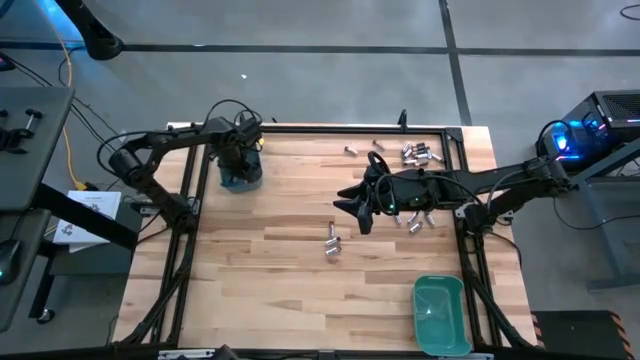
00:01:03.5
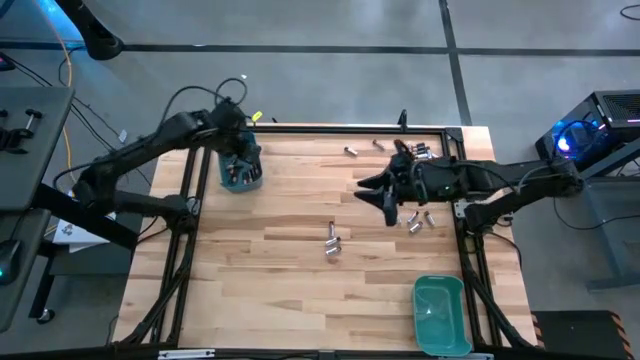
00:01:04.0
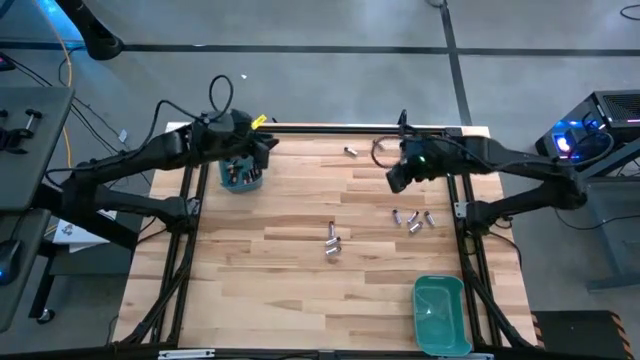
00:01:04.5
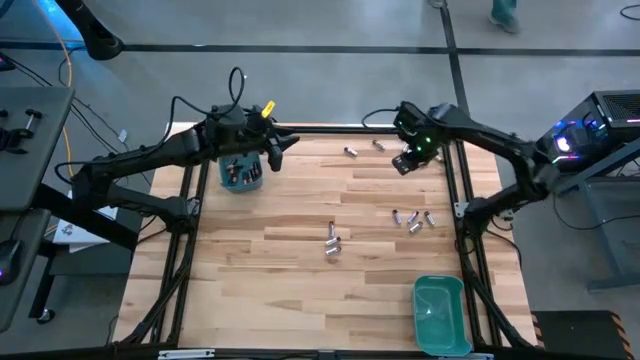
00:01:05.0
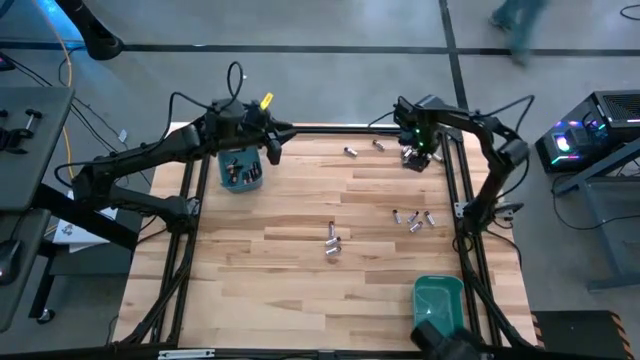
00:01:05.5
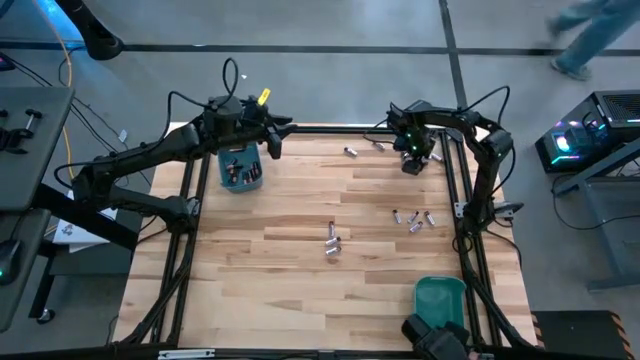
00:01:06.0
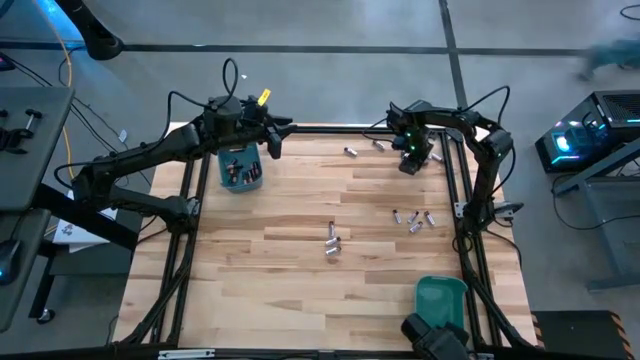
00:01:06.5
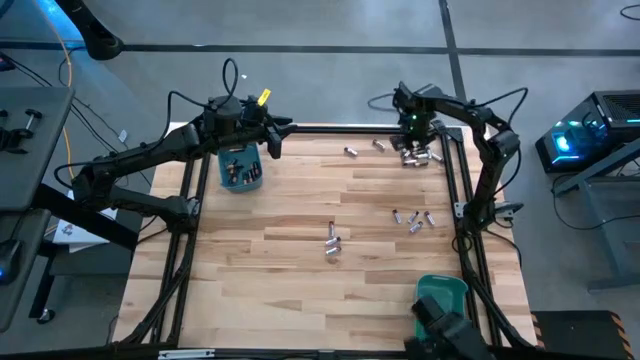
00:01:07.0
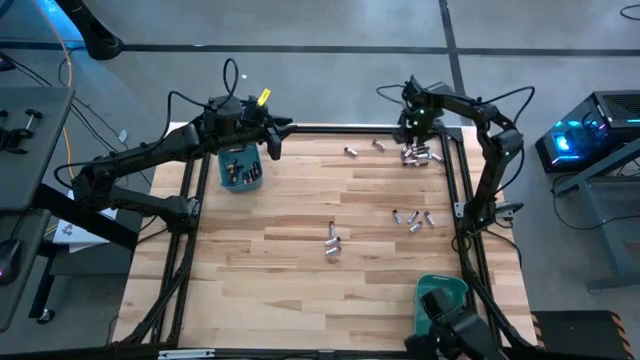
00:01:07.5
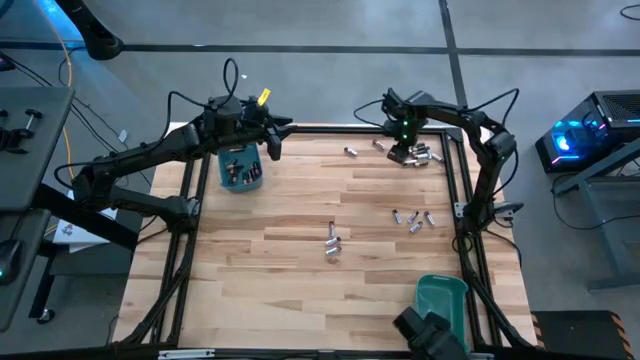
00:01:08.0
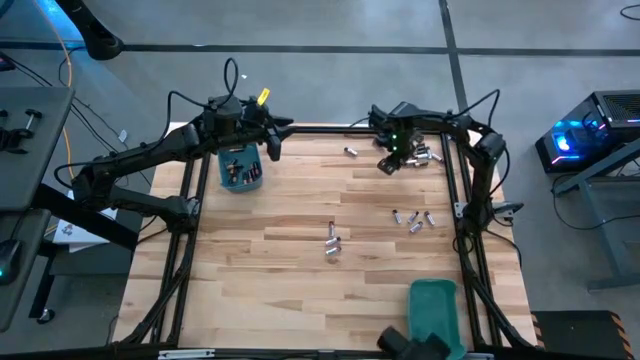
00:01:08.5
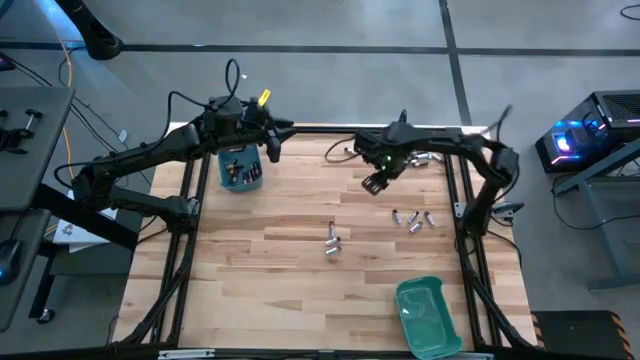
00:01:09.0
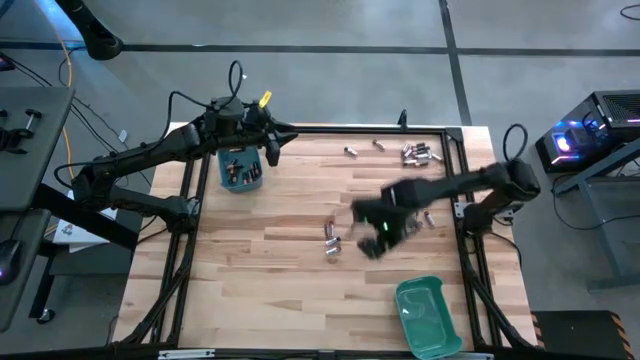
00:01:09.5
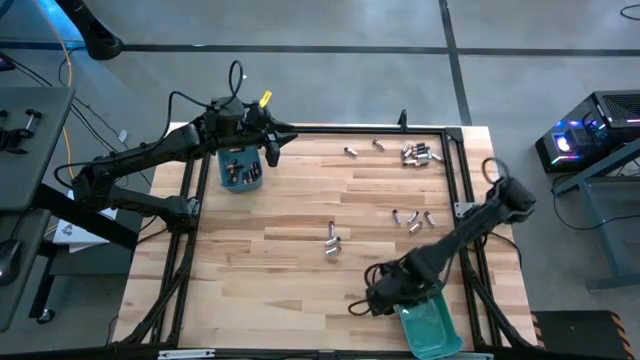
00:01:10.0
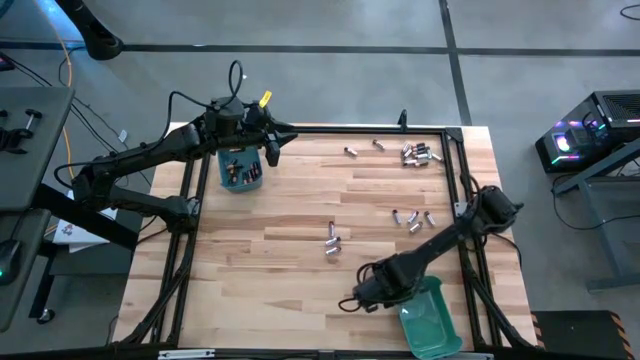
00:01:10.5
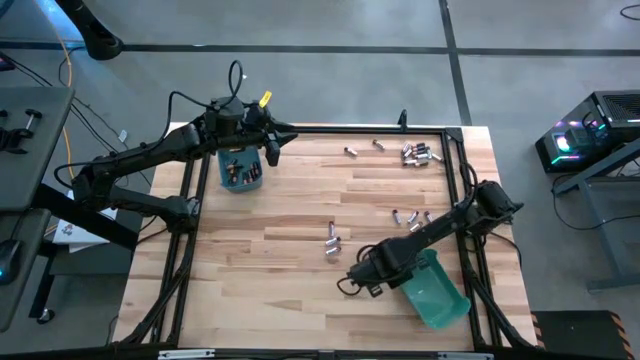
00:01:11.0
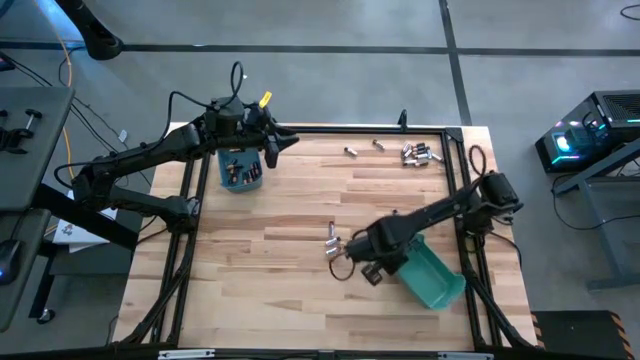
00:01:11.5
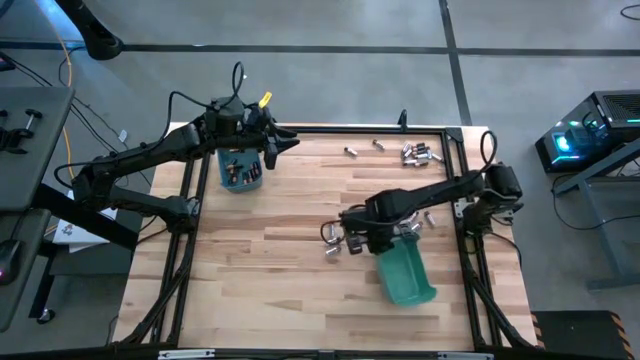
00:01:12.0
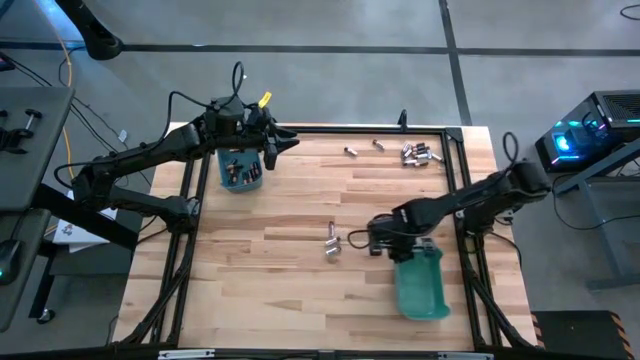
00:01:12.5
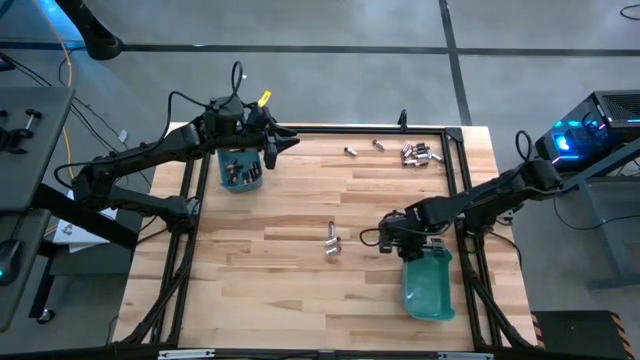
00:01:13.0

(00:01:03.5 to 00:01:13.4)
Task: Sort batteries
Adjust the green bin

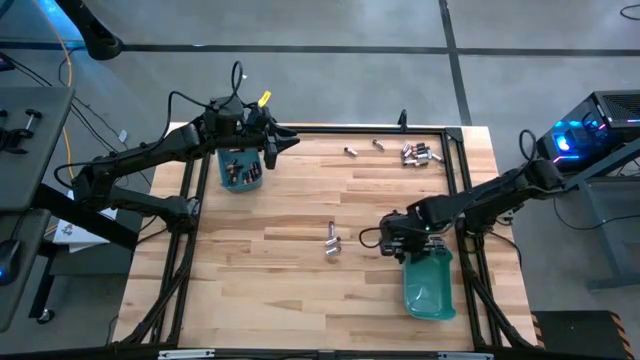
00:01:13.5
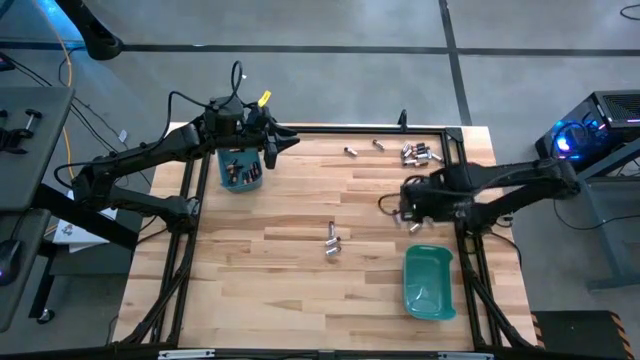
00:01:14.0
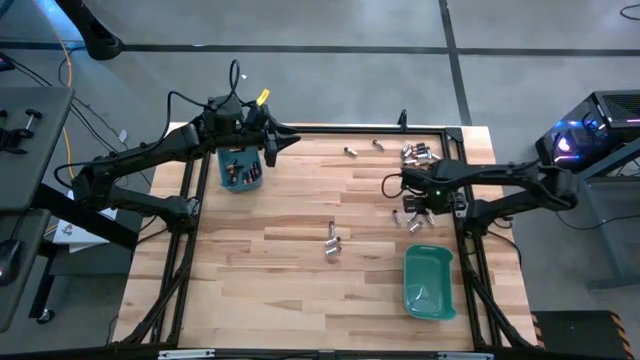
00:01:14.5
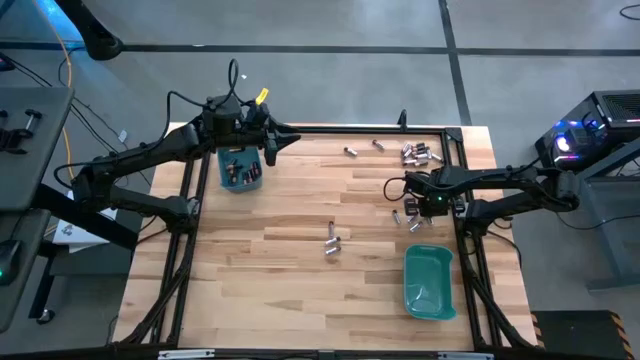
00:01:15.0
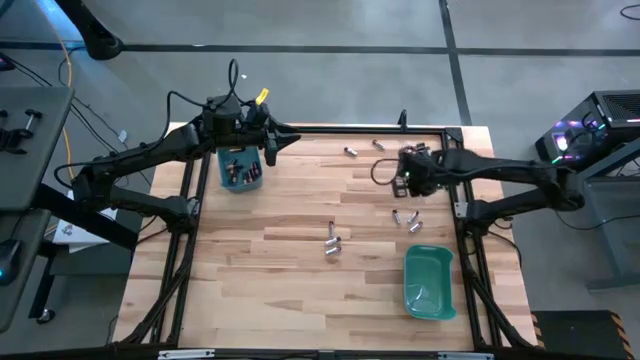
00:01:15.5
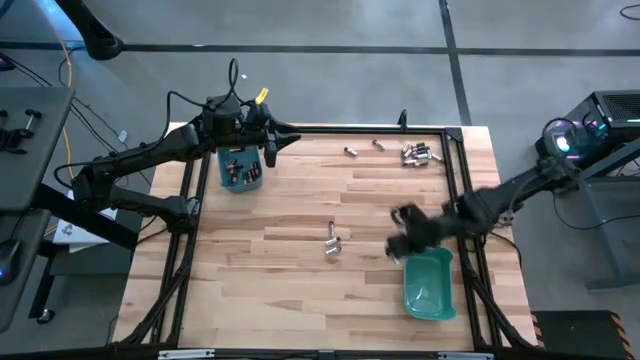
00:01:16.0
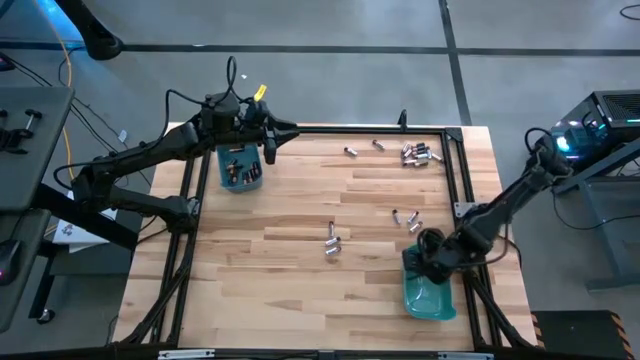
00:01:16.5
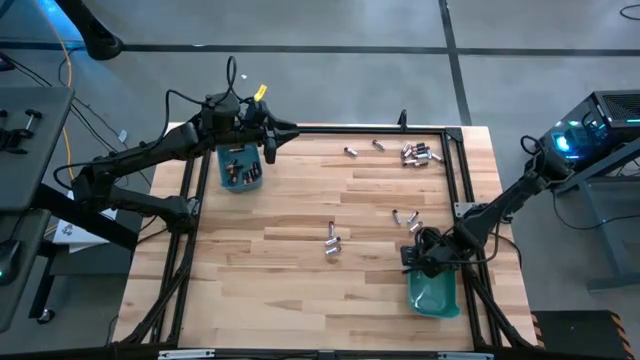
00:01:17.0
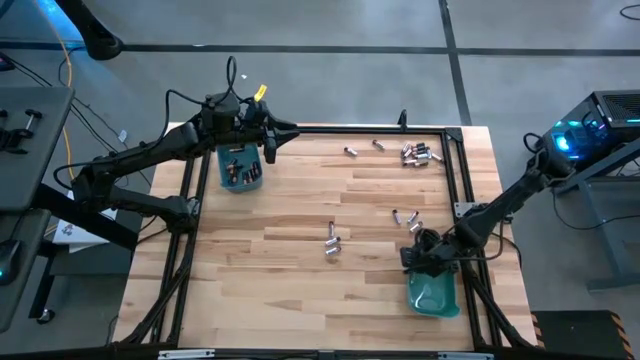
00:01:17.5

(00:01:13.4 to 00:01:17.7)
Put the silver battery into the green bin

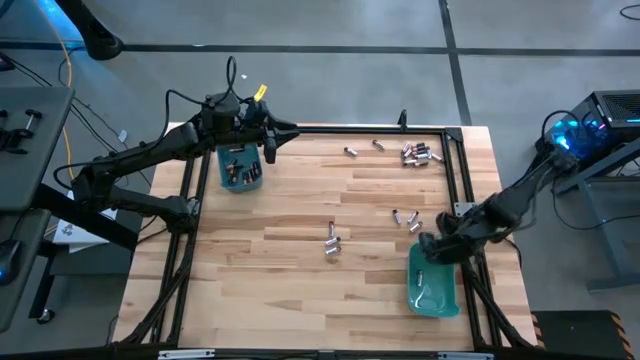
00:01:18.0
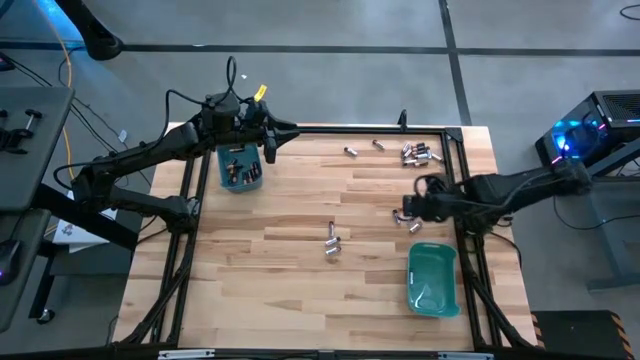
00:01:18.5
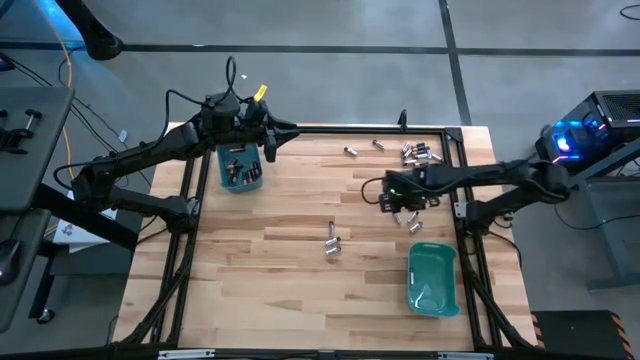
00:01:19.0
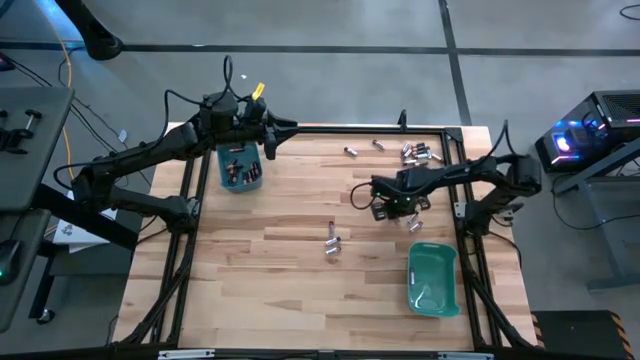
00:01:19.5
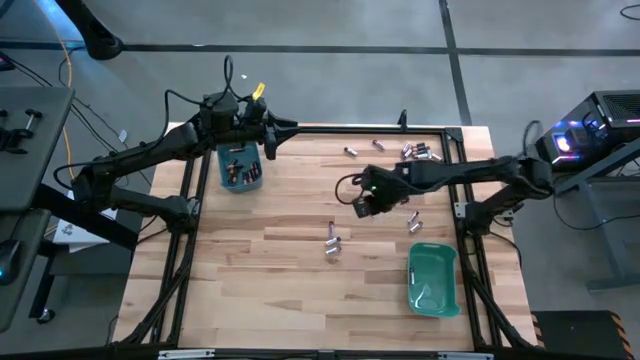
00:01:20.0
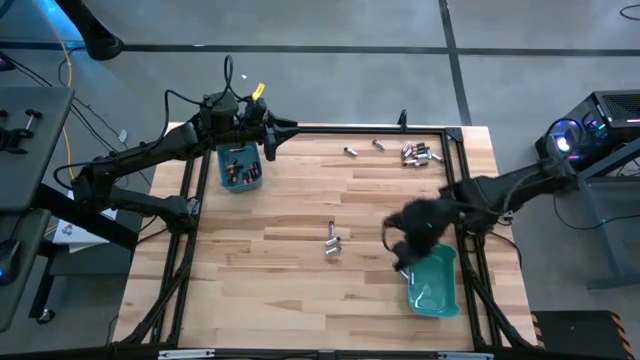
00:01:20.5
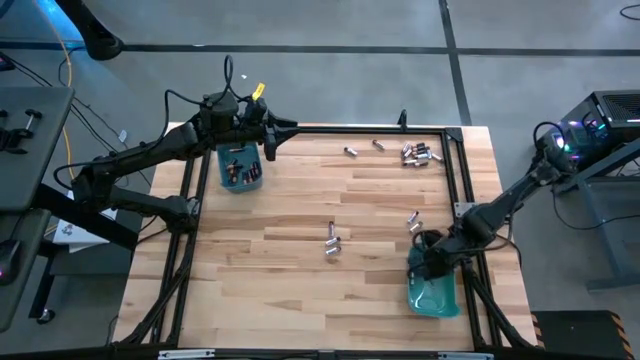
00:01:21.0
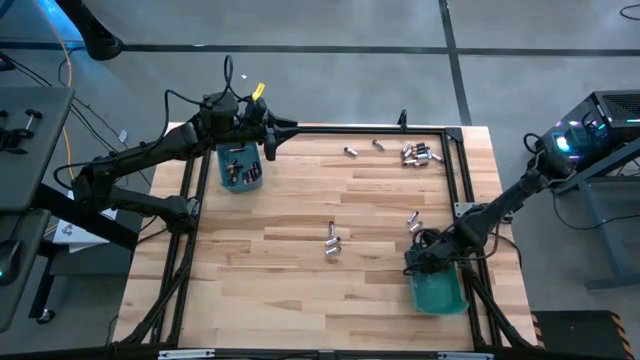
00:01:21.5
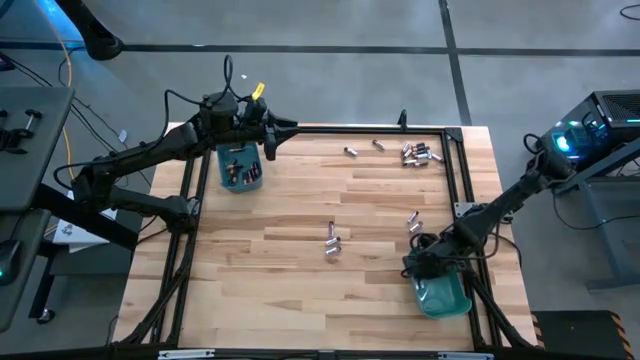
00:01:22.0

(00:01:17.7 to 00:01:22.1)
Put the silver battery into the green bin

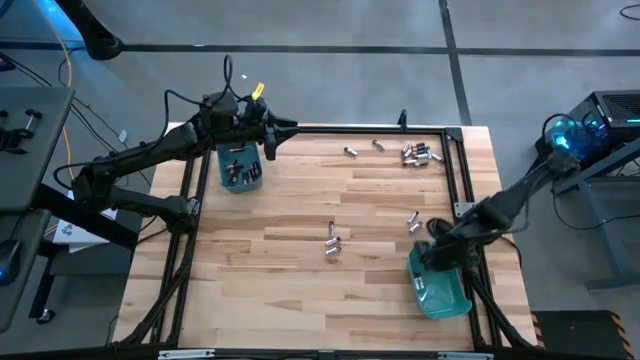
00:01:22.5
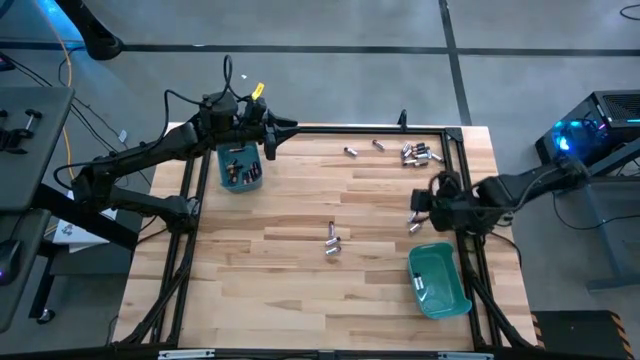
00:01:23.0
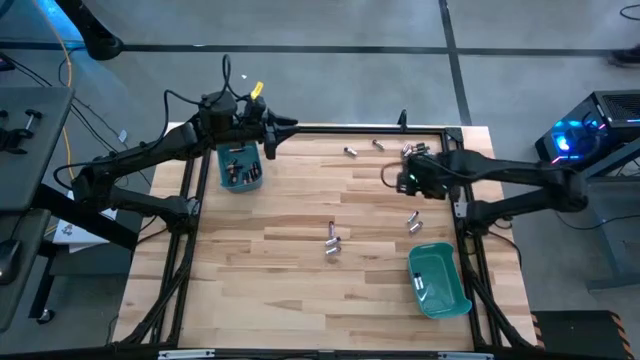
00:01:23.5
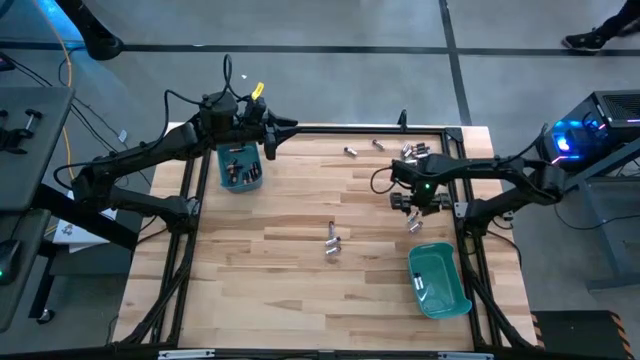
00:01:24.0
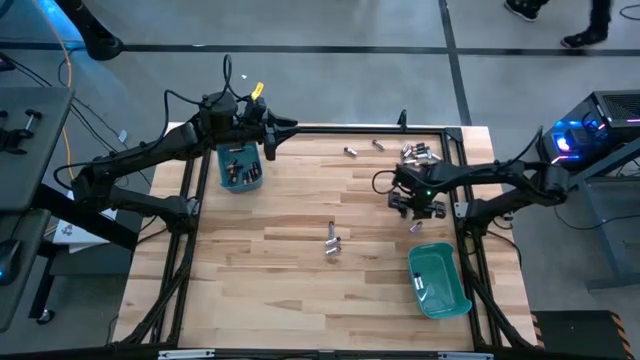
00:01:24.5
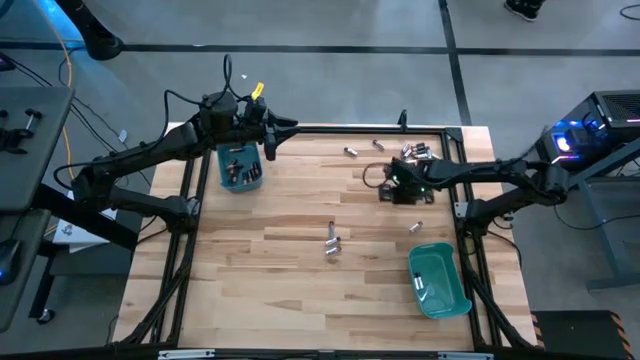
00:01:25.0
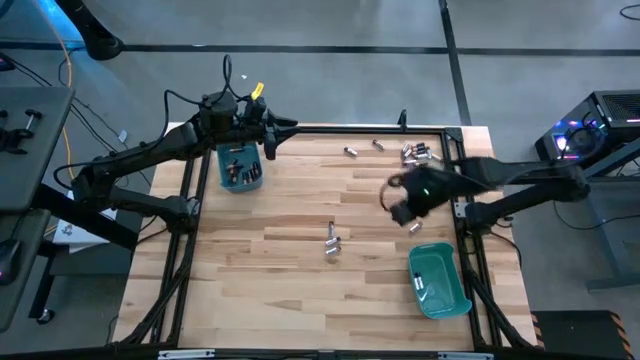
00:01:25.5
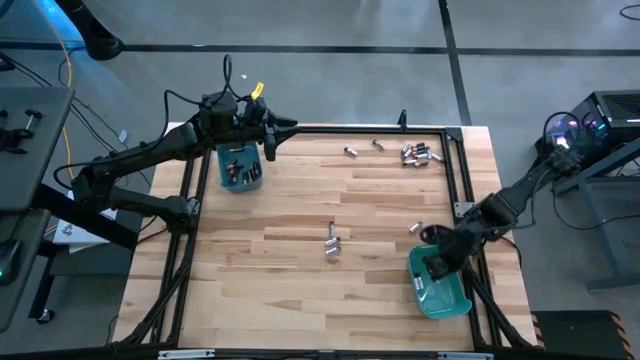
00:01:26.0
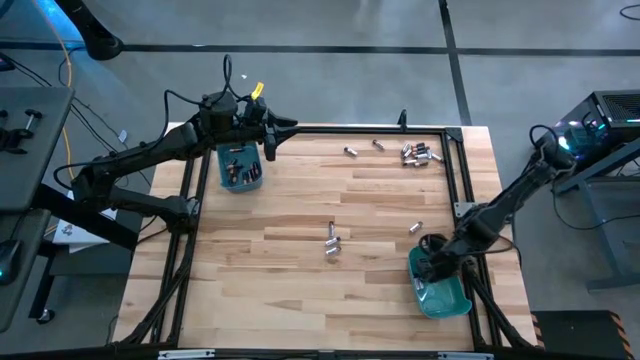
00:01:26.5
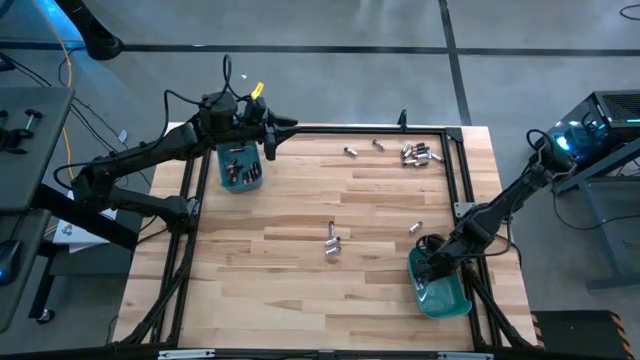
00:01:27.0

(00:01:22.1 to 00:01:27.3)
Put the silver battery into the green bin
